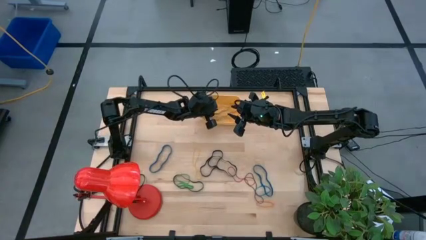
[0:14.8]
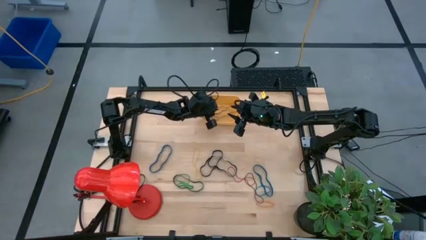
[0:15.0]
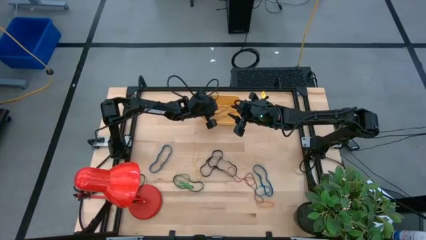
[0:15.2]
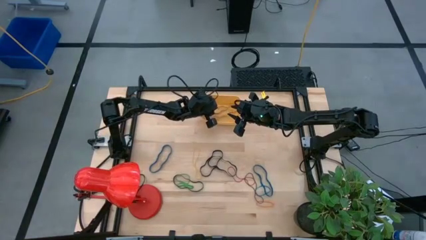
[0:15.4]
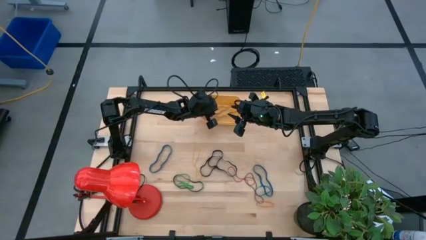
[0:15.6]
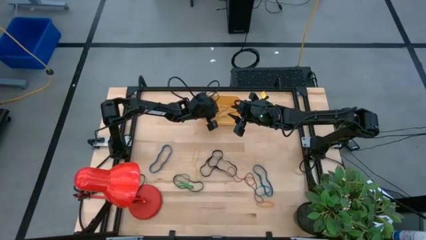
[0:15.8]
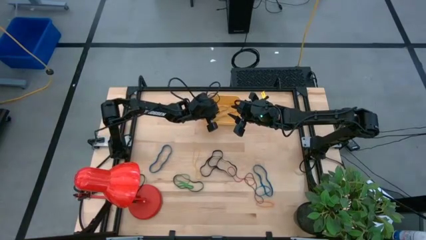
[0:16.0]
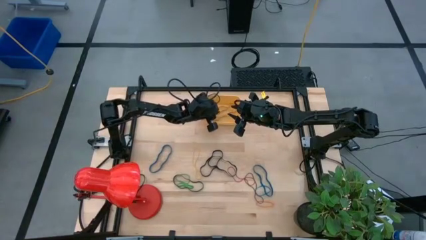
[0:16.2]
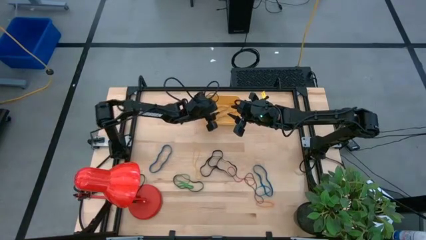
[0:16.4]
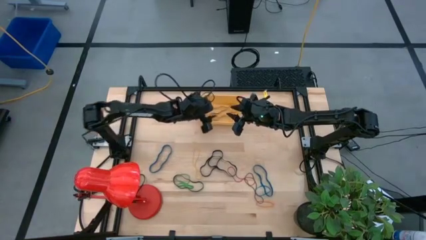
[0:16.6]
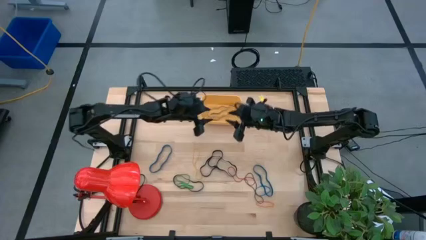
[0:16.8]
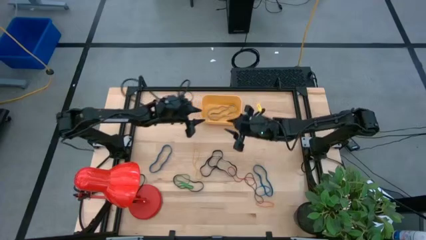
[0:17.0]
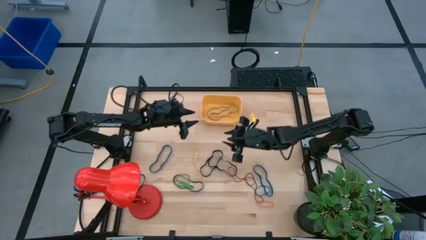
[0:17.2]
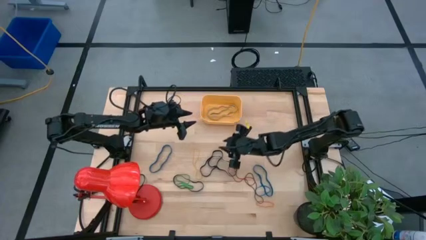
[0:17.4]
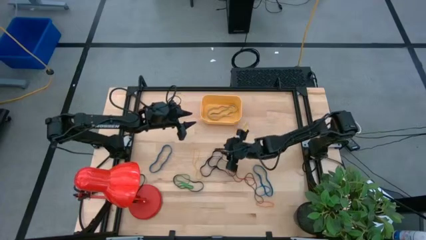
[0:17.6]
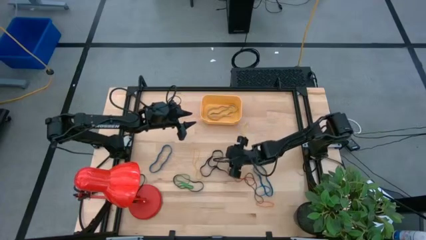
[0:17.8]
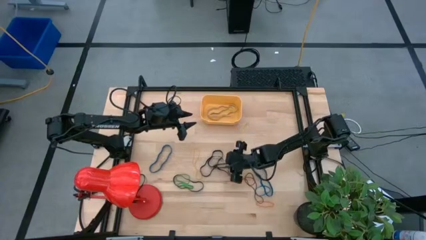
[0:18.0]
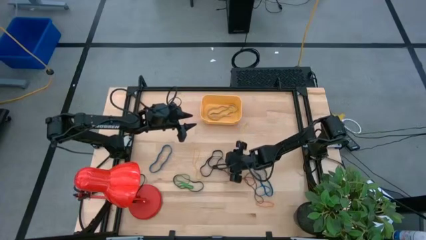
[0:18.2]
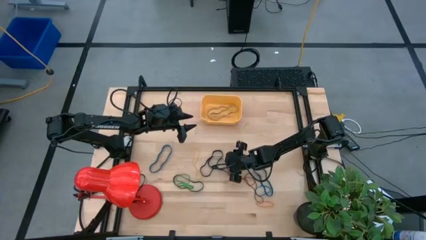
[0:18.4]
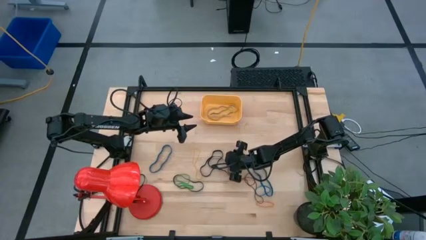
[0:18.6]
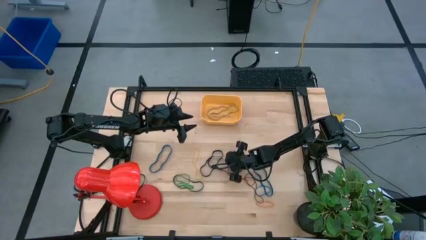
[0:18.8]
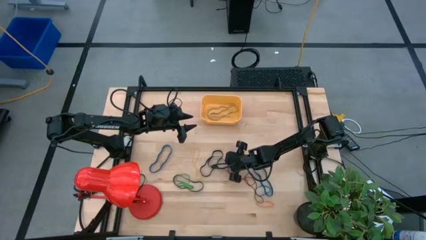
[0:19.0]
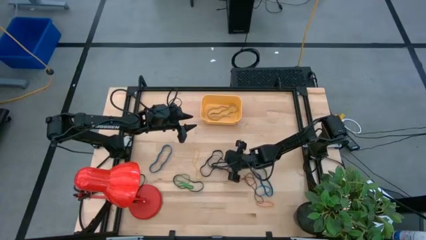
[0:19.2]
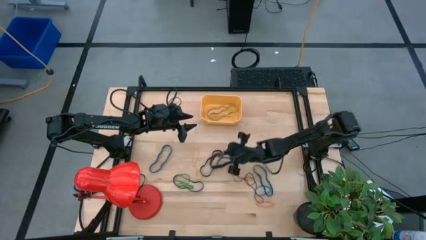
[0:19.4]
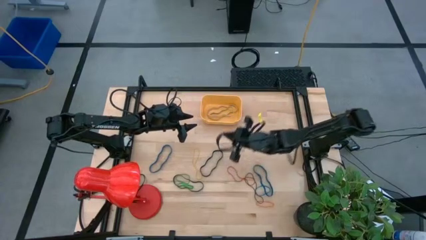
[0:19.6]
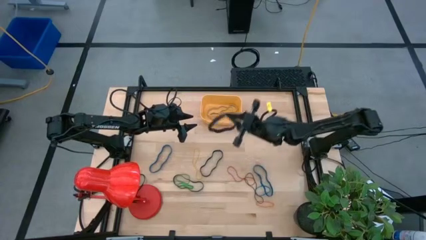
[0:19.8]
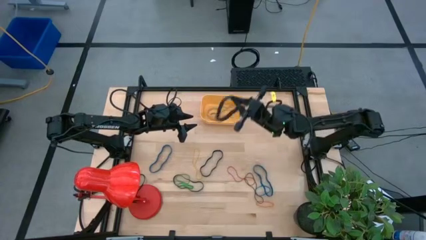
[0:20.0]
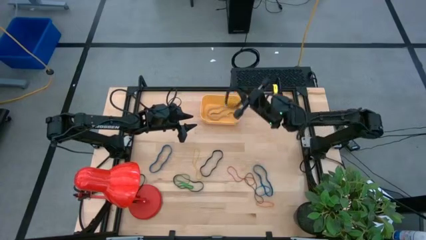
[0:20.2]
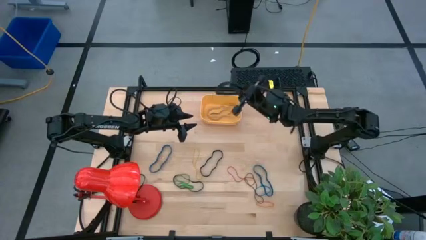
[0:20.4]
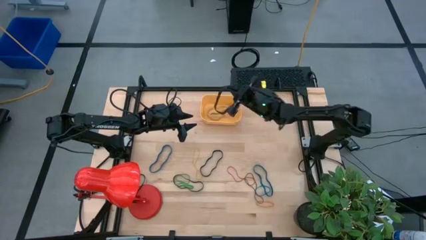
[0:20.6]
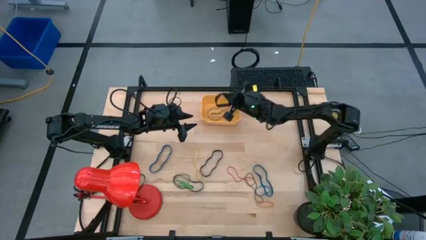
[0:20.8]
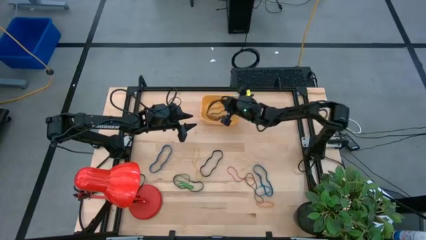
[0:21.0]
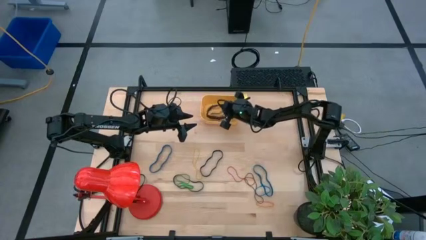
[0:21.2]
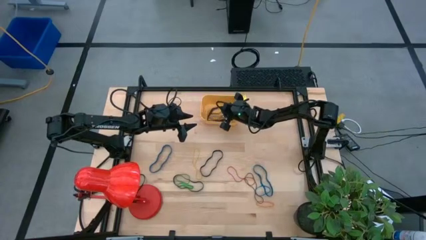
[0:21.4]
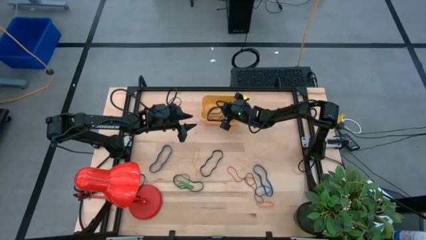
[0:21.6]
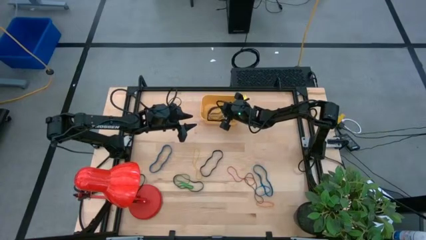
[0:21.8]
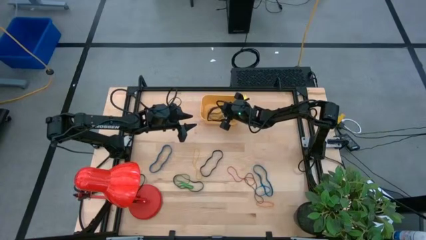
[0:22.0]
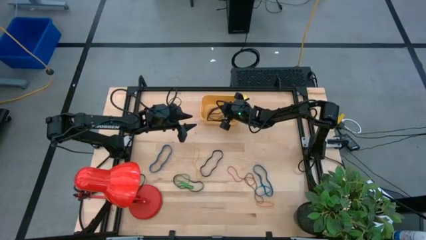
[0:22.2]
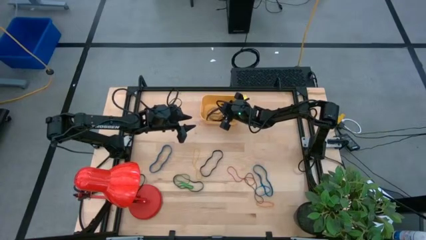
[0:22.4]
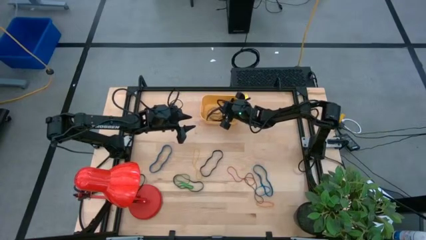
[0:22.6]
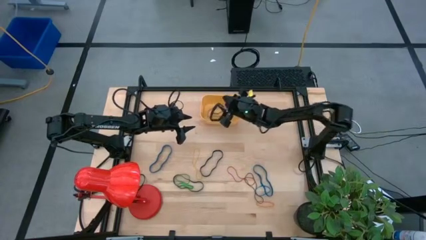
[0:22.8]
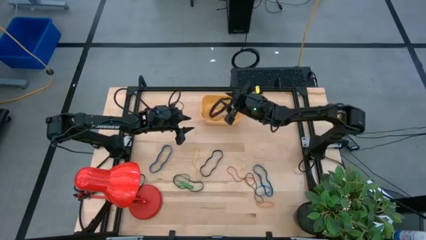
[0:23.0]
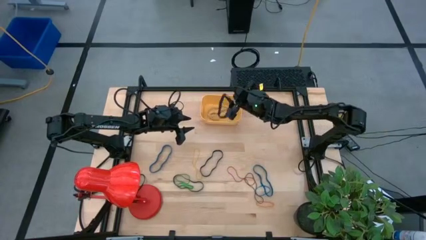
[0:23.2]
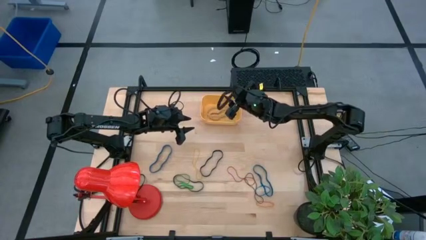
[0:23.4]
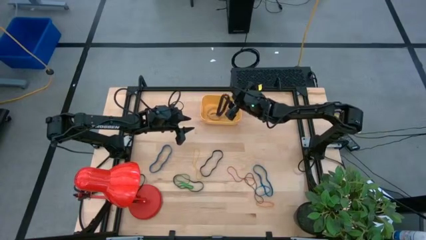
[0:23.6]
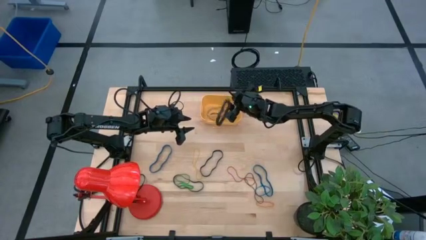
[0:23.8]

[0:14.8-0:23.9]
Task: Pick and place rubber bands into bin
Put the top right black rubber band into the yellow bin

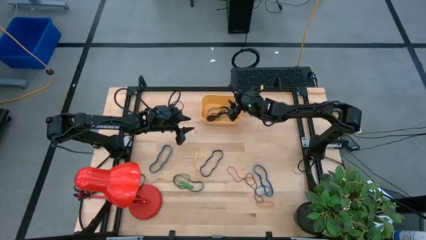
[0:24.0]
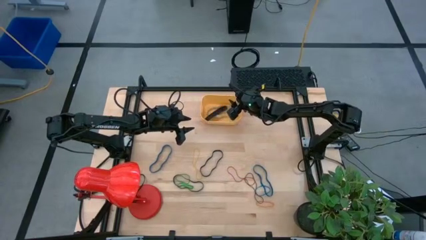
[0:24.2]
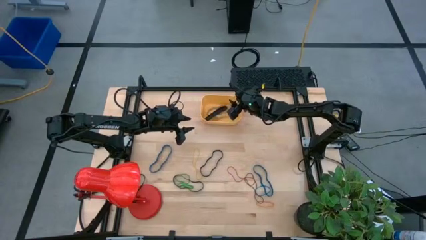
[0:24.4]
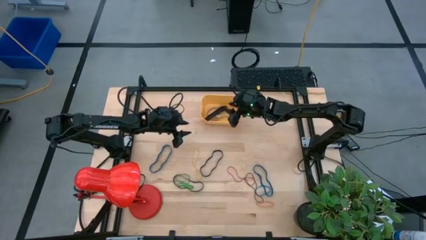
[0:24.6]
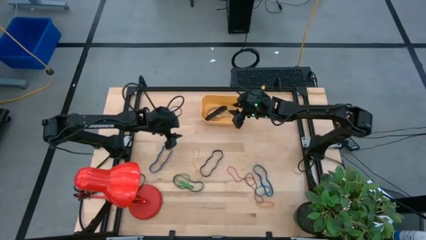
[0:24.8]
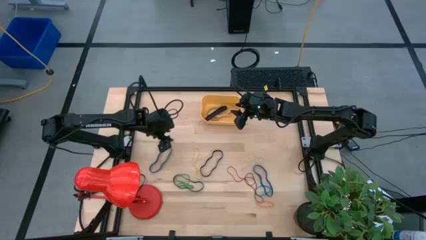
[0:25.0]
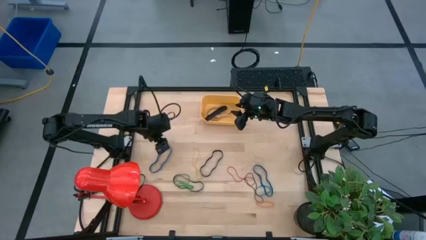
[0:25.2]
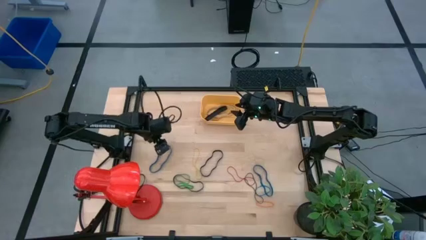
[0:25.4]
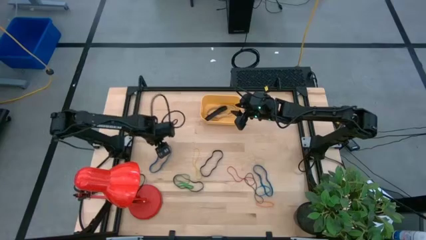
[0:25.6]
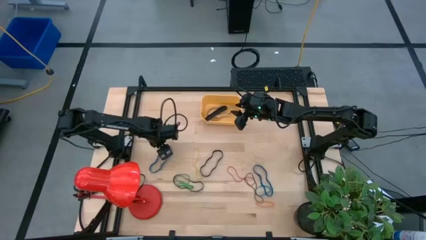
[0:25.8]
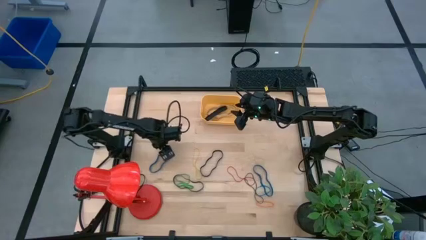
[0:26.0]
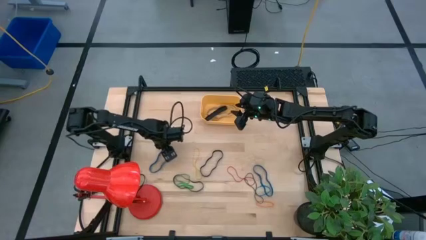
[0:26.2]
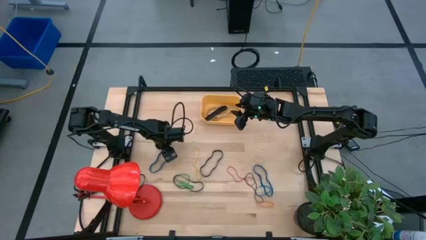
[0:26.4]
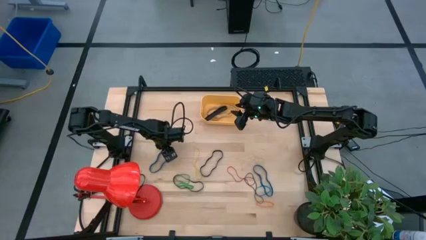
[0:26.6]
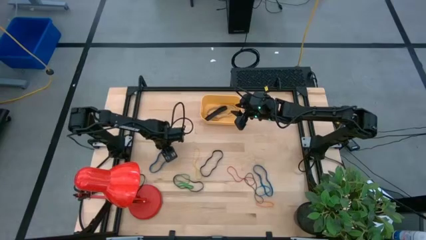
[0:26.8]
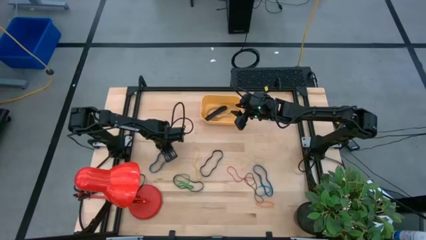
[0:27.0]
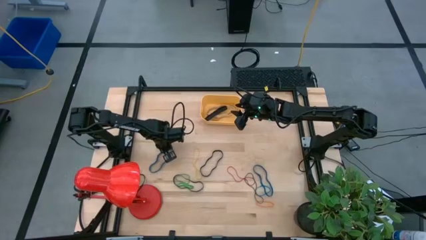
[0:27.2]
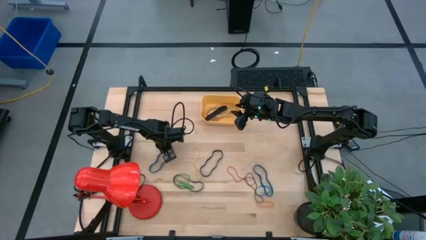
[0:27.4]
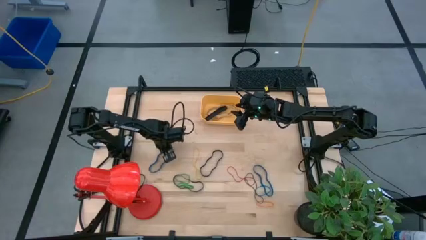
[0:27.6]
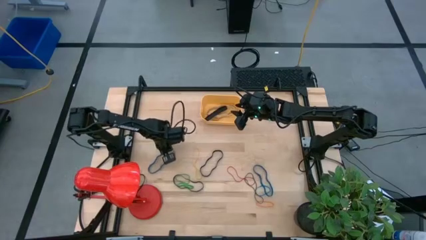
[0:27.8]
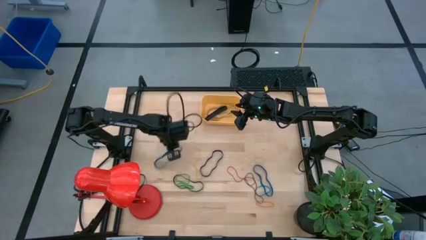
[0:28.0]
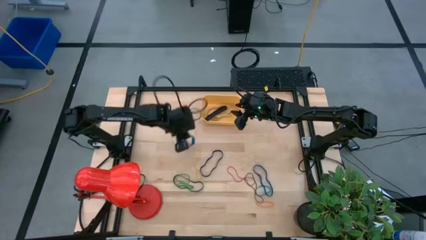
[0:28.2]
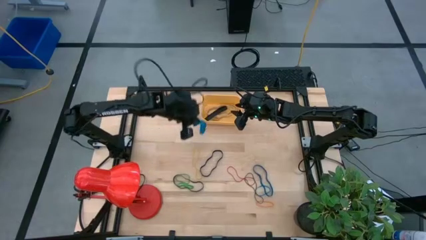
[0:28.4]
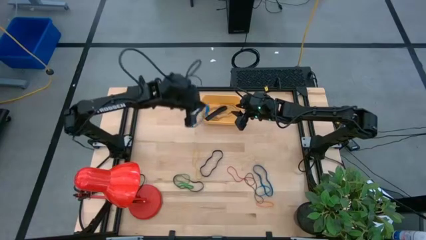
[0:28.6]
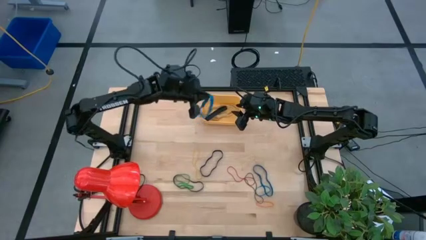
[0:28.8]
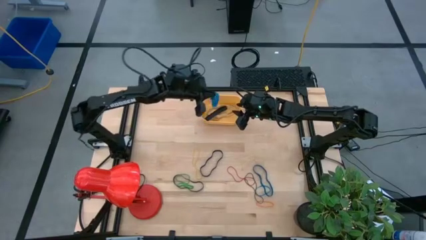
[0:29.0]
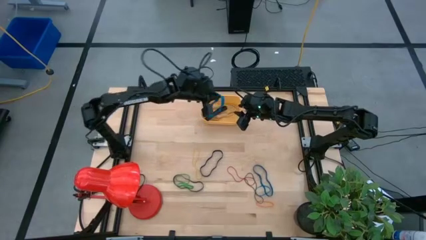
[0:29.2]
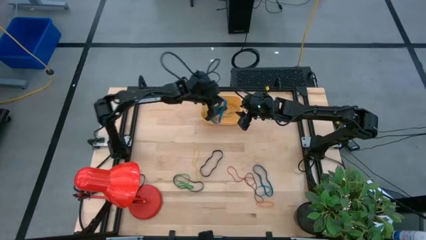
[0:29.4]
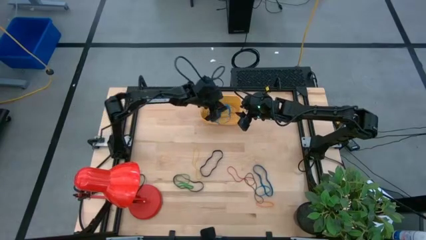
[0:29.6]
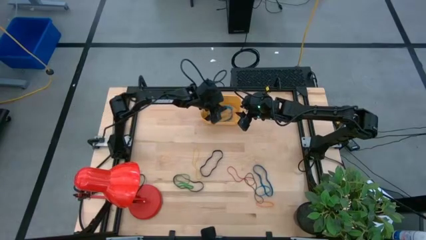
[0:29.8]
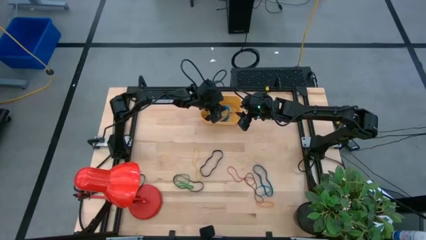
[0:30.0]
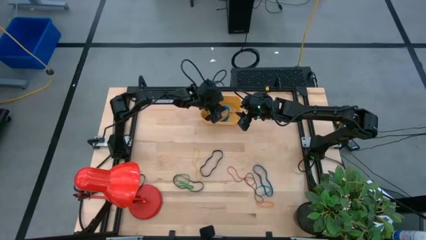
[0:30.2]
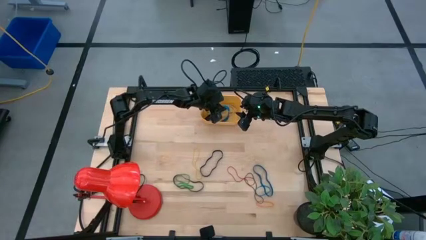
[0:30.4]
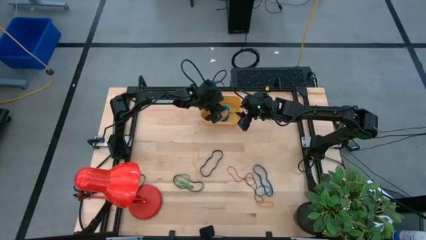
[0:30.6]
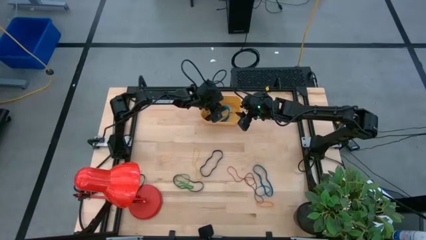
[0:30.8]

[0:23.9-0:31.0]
Put the top left blue rubber band into the yellow bin
